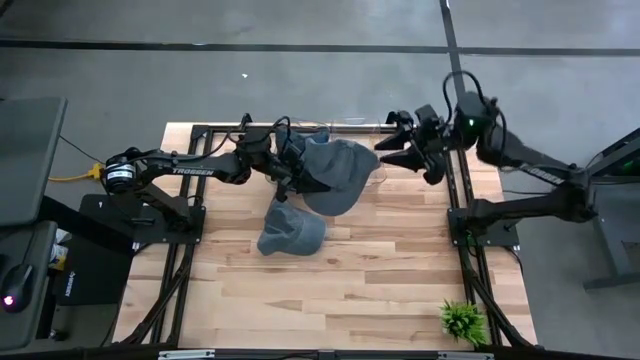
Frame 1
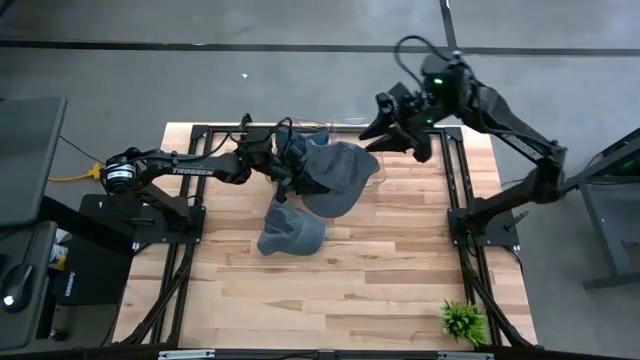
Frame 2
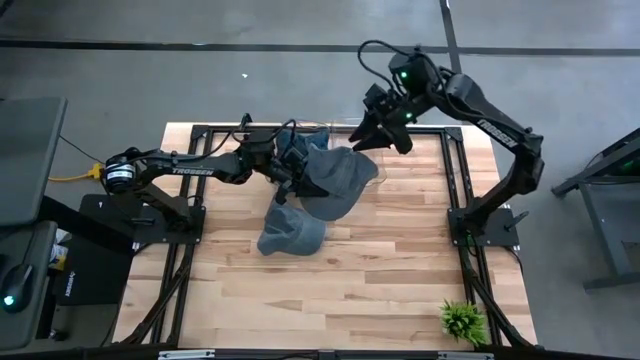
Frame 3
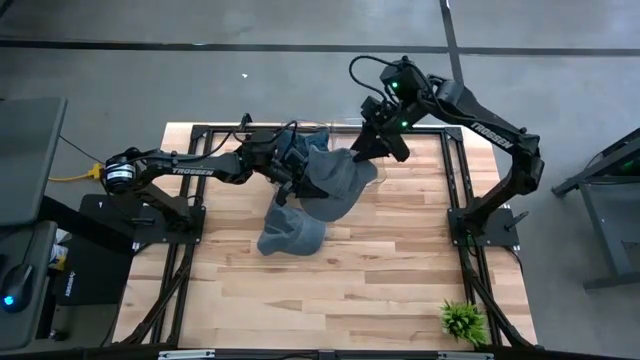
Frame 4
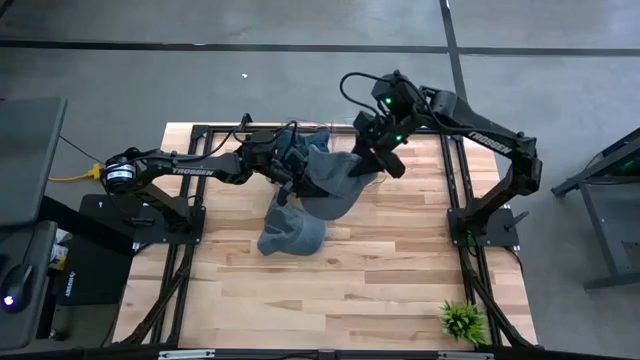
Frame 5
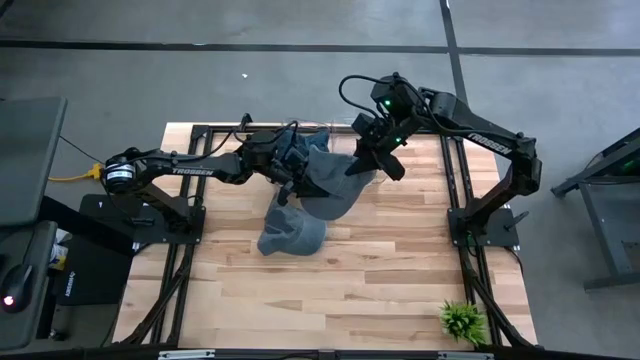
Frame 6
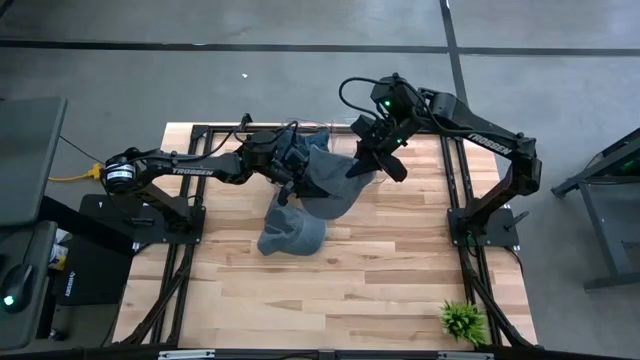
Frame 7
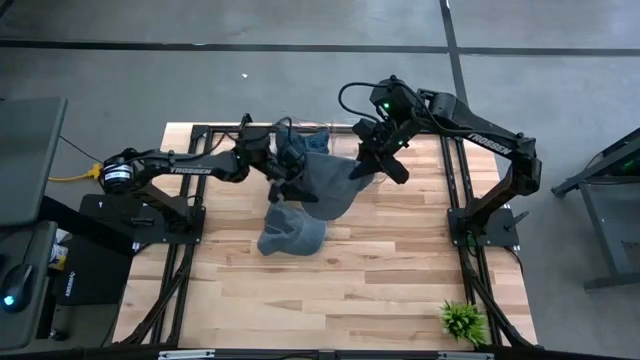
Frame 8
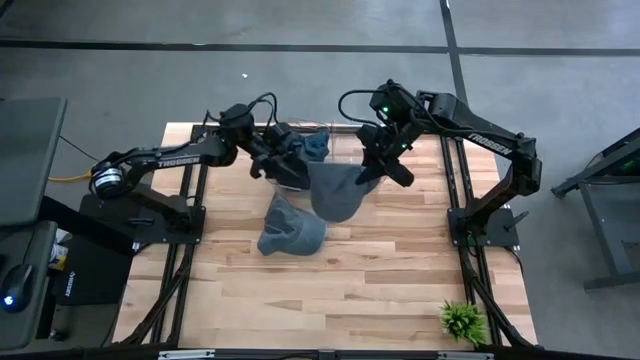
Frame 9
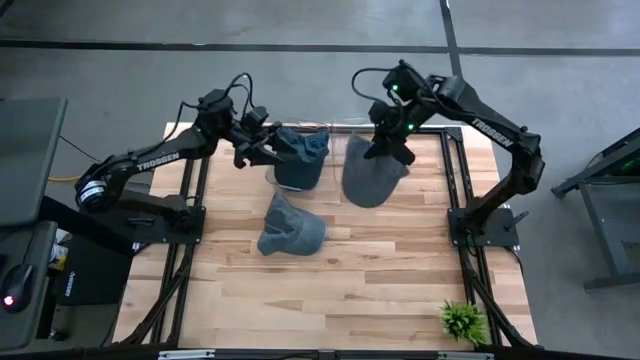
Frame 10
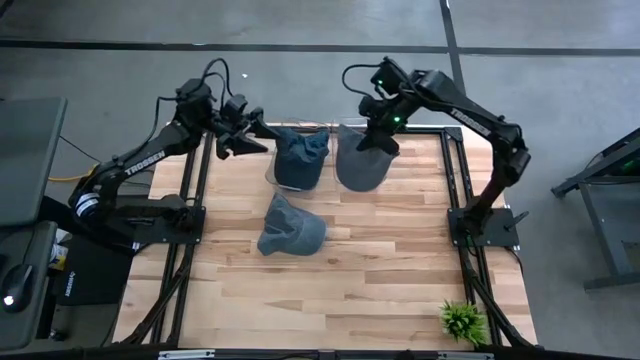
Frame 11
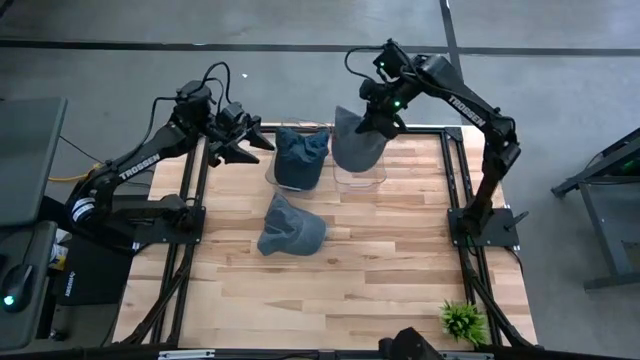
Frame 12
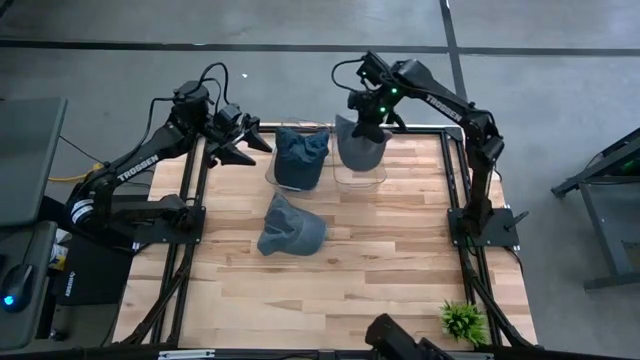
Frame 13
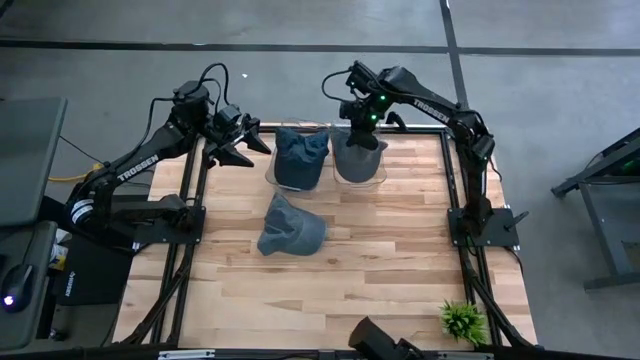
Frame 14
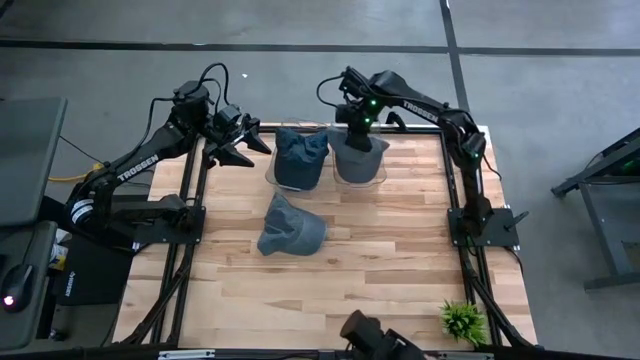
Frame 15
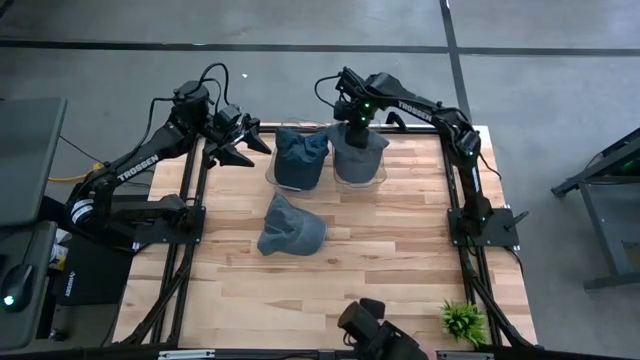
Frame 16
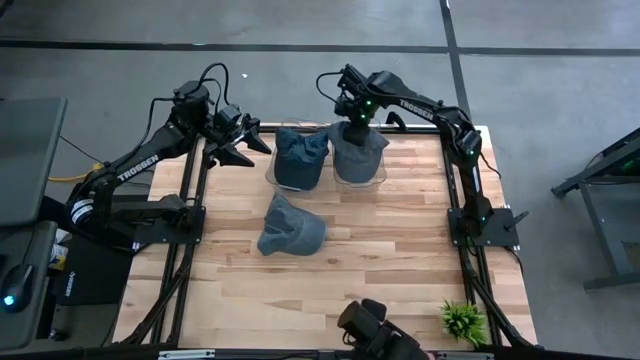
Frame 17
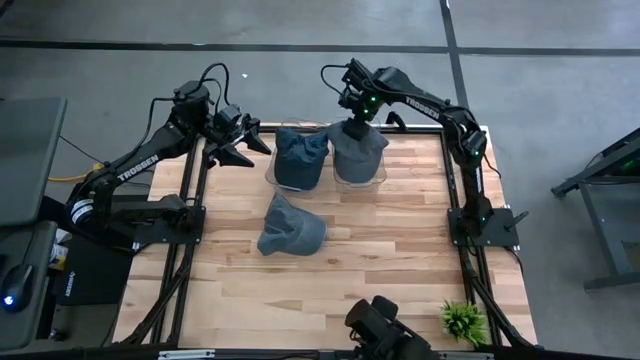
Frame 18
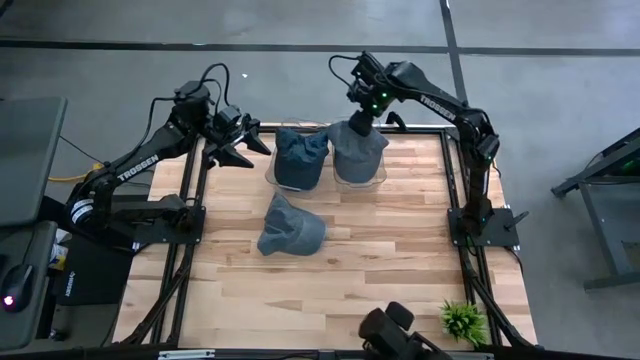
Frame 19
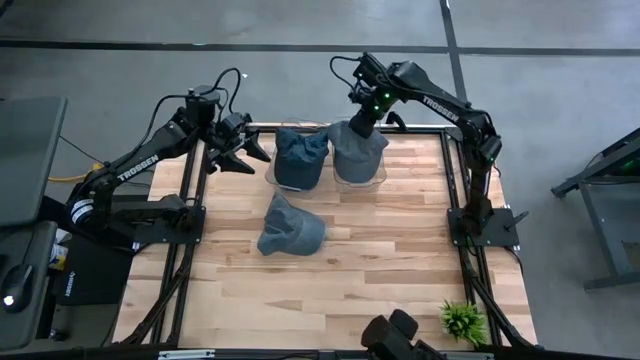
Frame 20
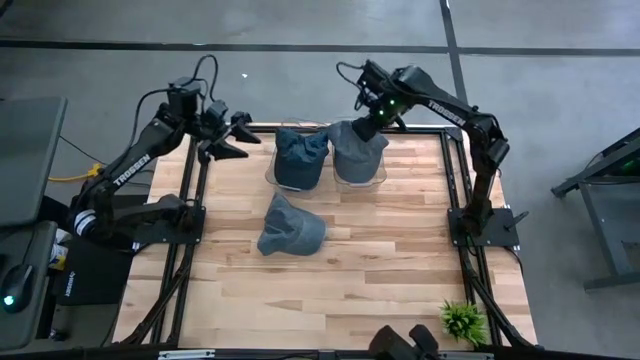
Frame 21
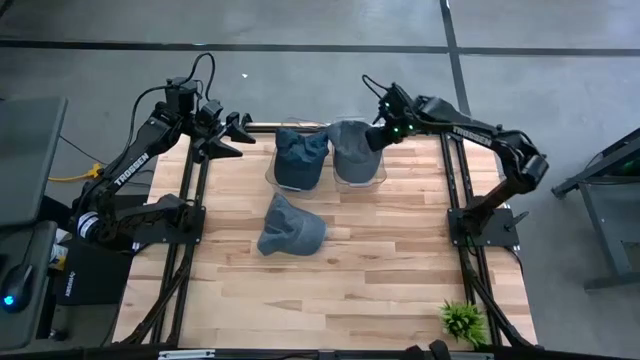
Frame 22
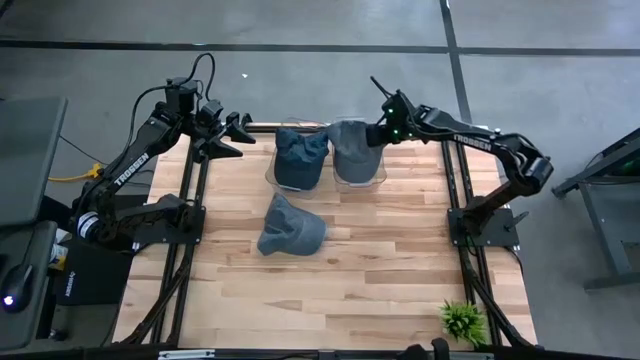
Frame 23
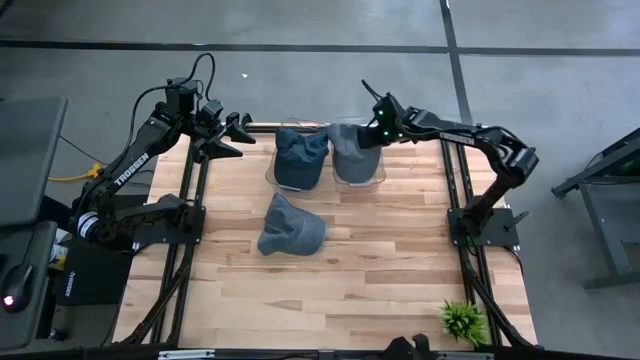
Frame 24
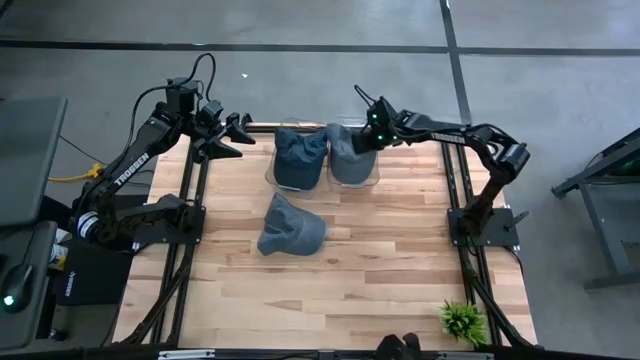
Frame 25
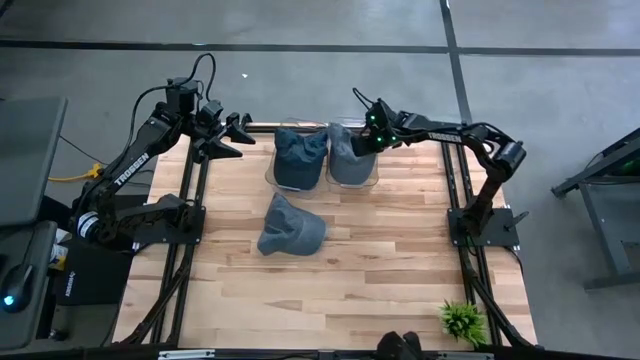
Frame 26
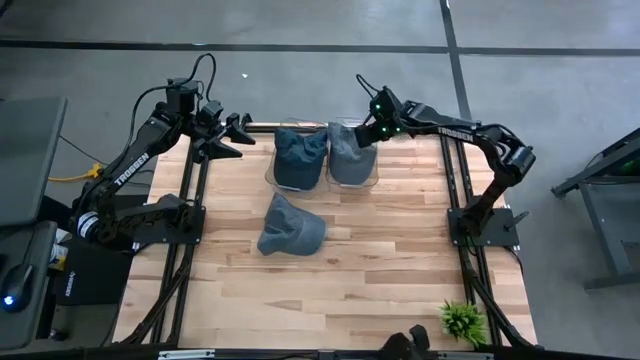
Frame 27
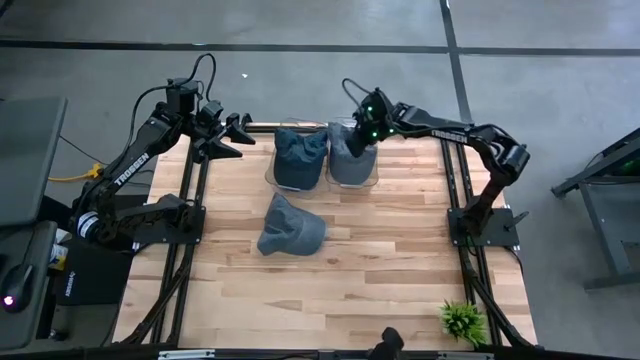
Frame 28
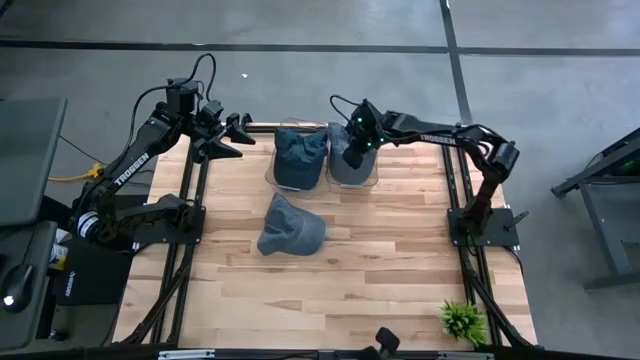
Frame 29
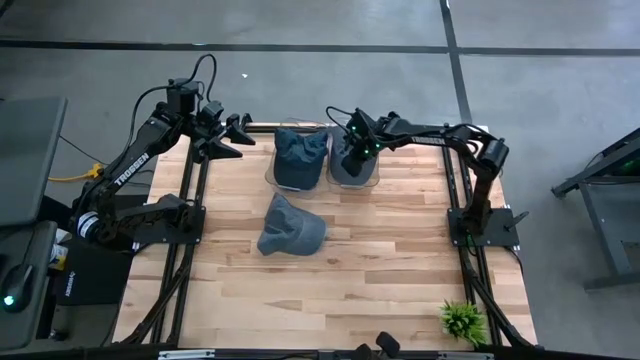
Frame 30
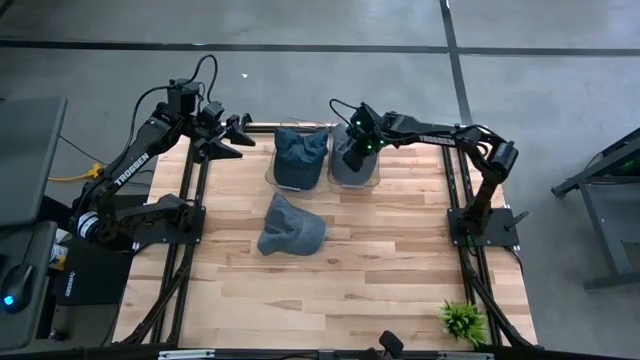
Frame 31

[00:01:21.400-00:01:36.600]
Task: Pick & Place hat
Put the right gray cap into the right transparent bin

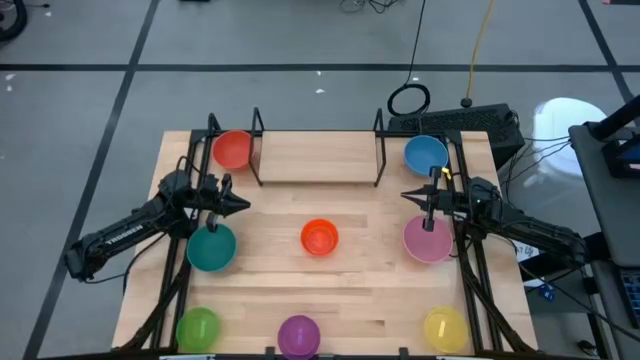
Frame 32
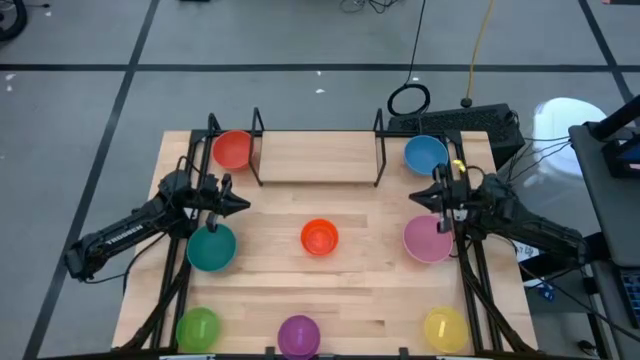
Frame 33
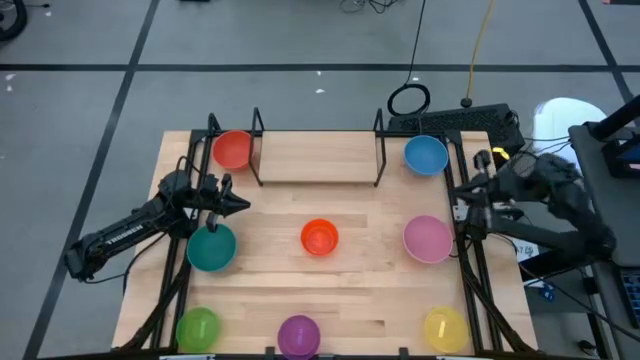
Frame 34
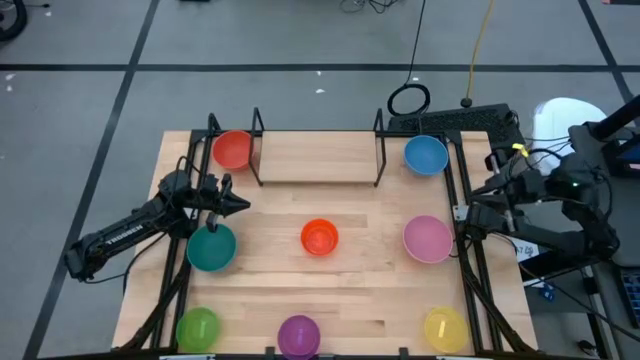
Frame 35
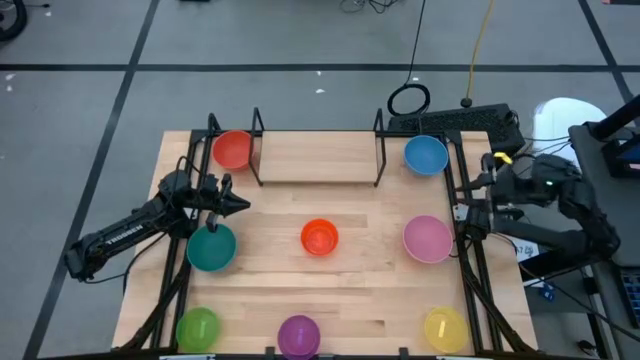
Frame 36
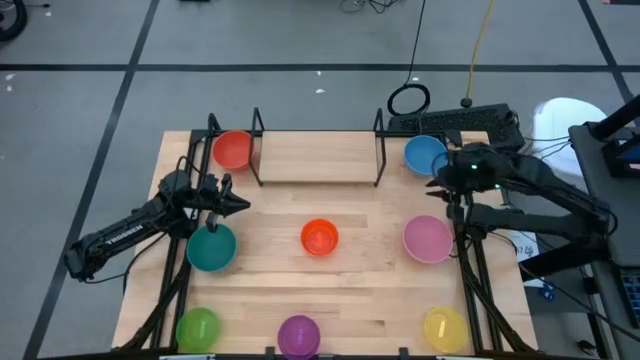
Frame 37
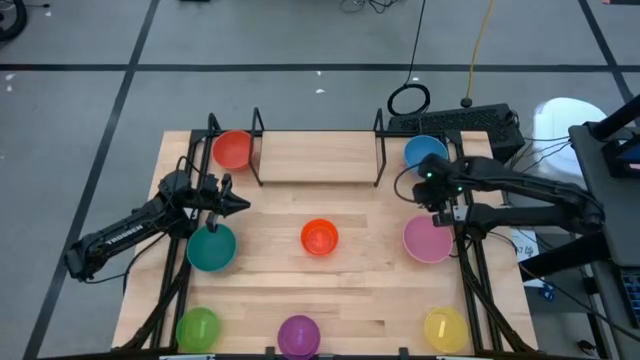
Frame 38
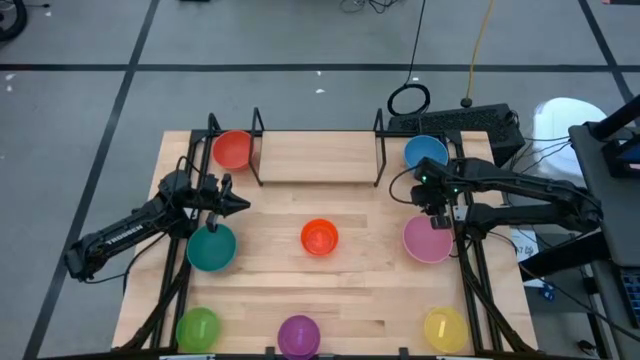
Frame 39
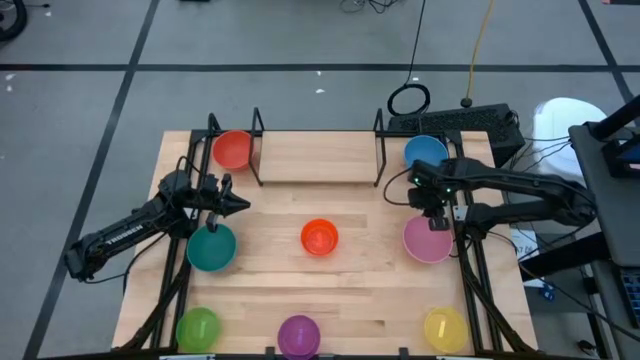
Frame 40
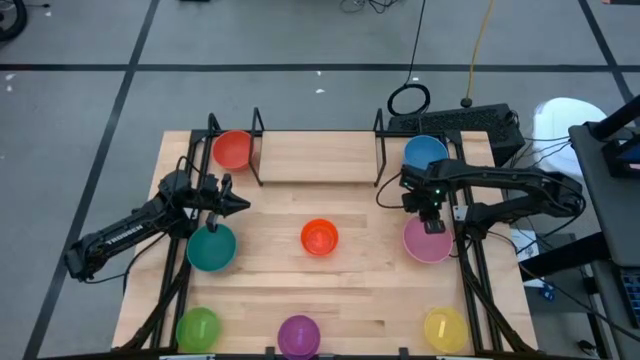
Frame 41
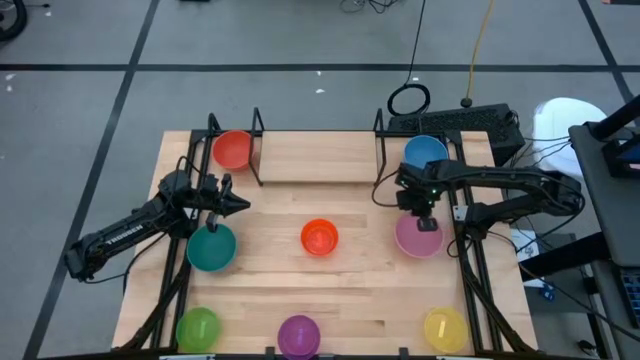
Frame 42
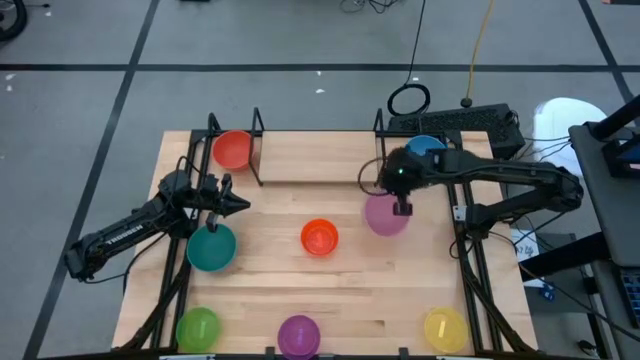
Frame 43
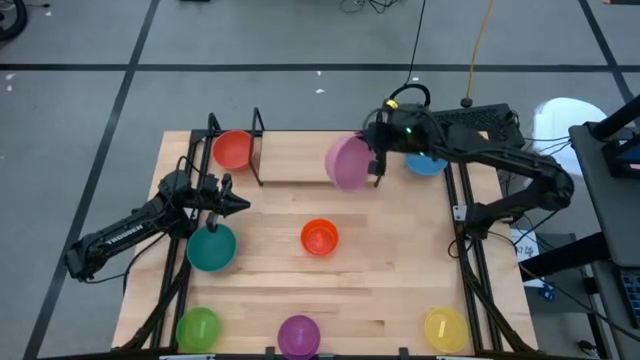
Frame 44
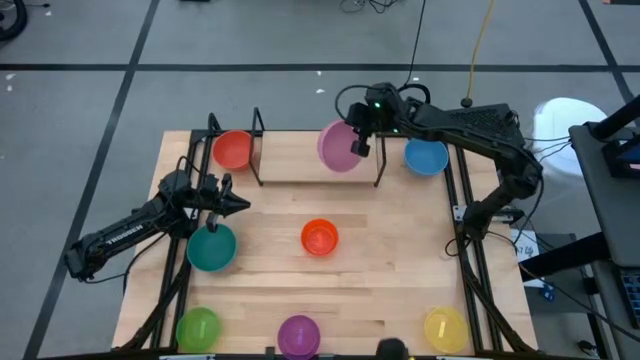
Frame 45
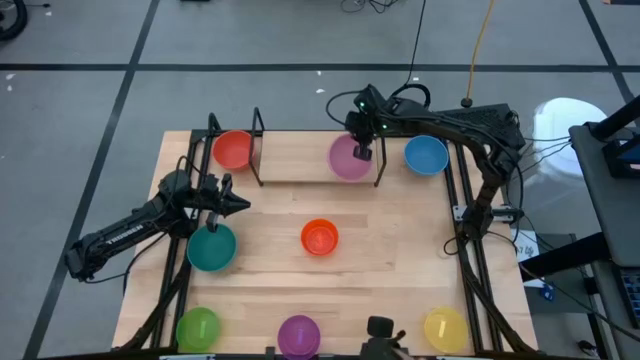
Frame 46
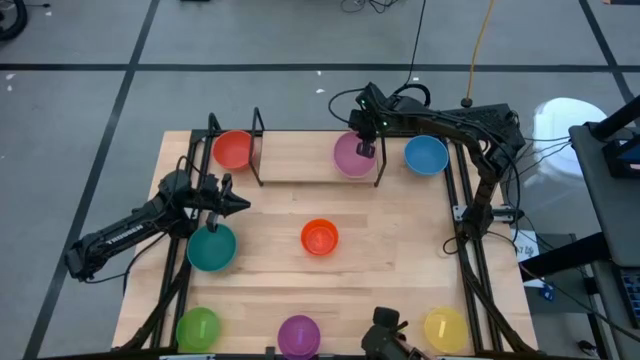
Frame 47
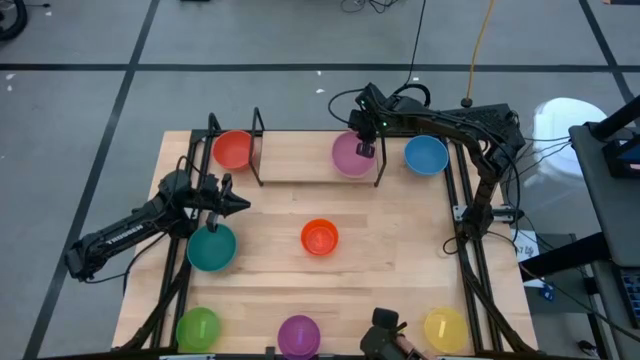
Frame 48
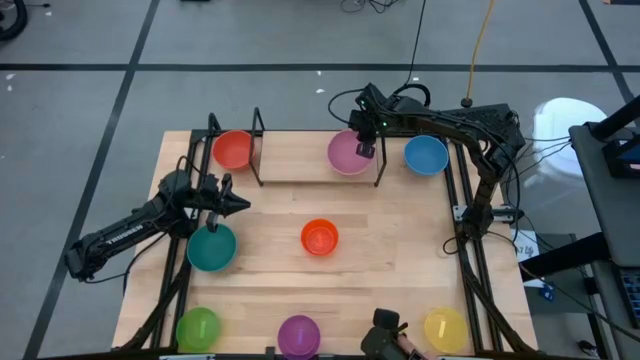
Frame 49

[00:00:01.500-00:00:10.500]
Task: Place and stack bowls onto a shelf
Put the pink bowl on the shelf
